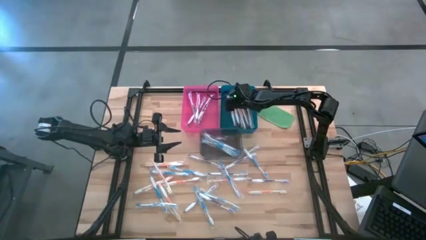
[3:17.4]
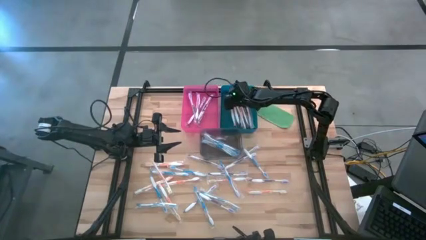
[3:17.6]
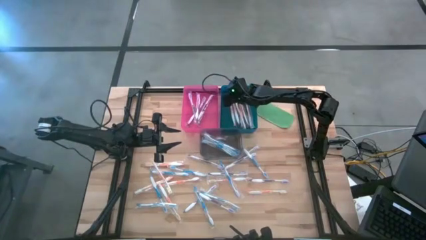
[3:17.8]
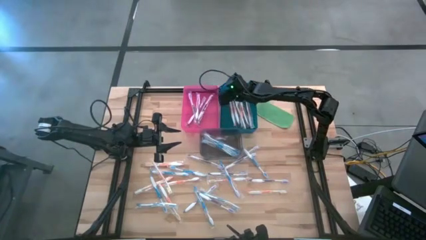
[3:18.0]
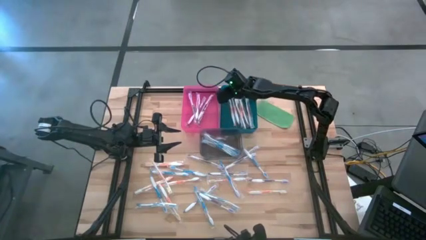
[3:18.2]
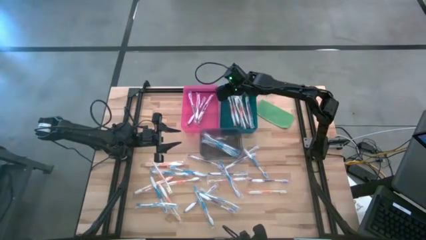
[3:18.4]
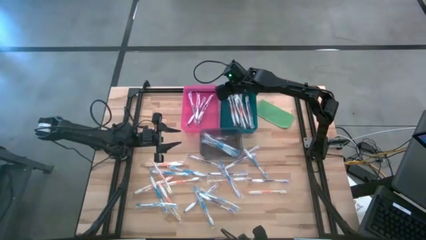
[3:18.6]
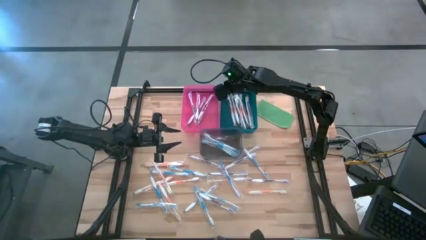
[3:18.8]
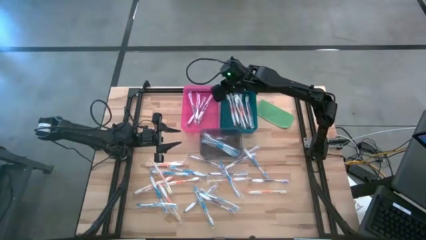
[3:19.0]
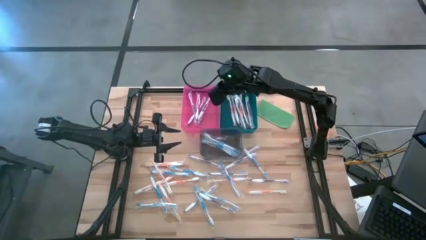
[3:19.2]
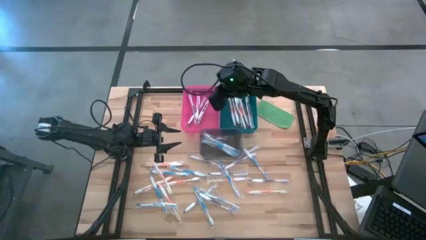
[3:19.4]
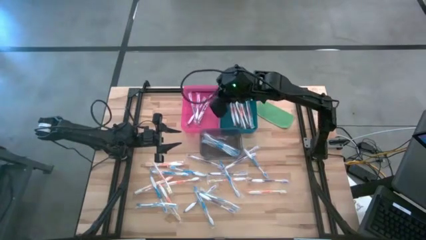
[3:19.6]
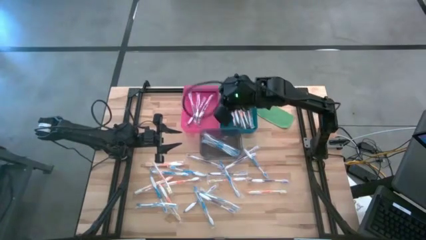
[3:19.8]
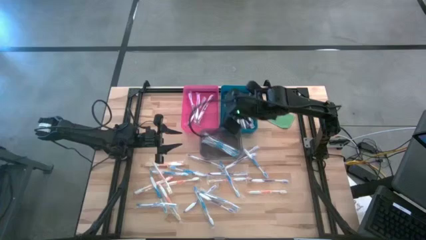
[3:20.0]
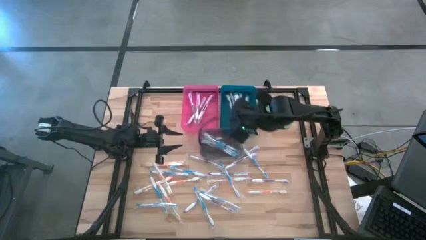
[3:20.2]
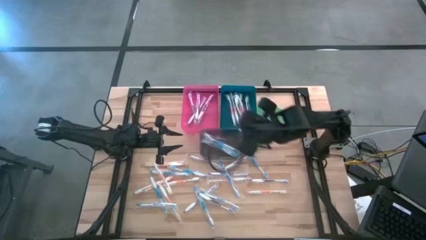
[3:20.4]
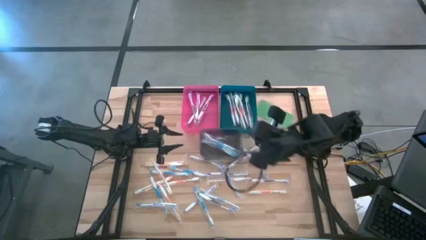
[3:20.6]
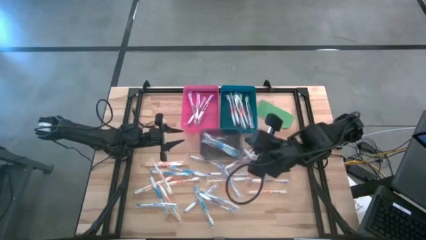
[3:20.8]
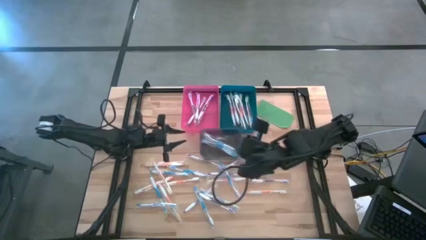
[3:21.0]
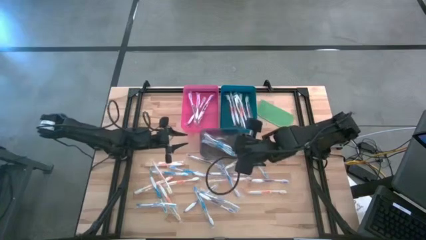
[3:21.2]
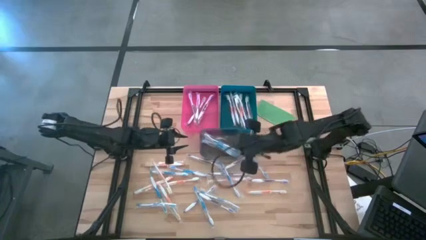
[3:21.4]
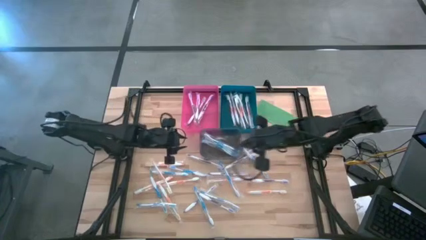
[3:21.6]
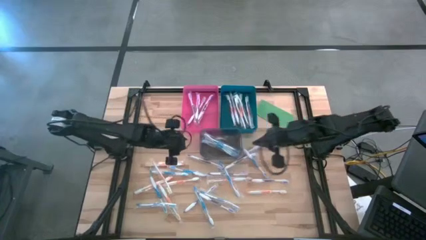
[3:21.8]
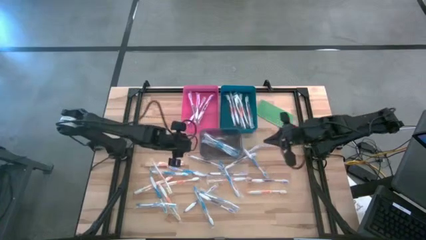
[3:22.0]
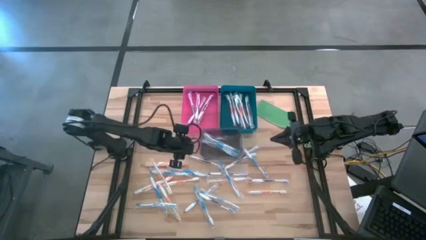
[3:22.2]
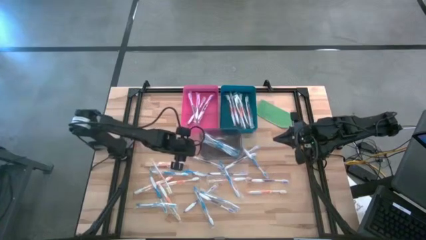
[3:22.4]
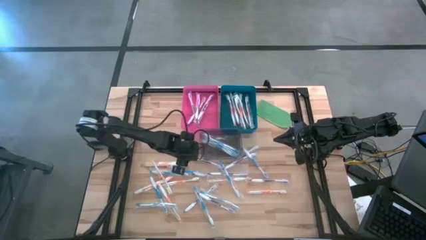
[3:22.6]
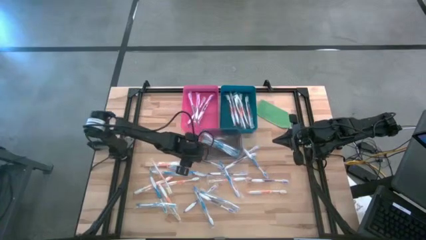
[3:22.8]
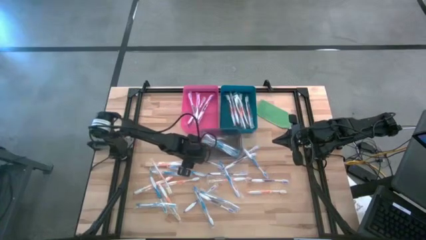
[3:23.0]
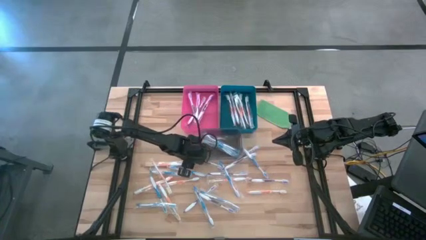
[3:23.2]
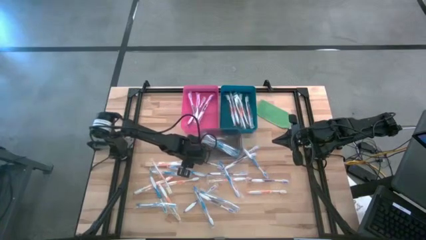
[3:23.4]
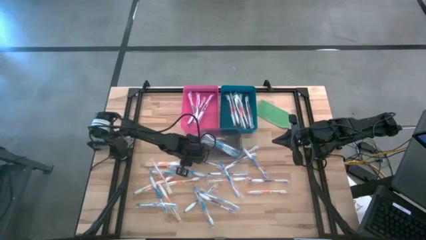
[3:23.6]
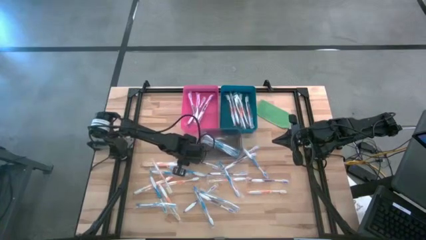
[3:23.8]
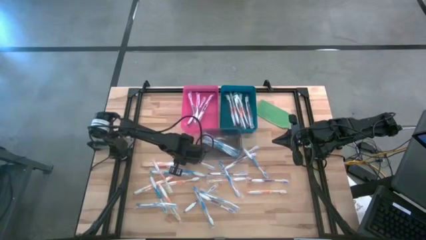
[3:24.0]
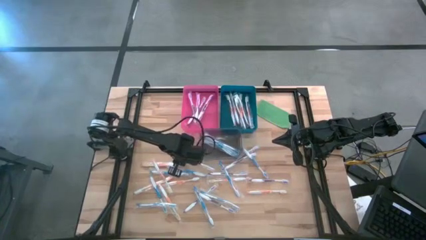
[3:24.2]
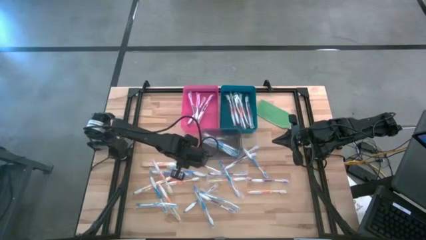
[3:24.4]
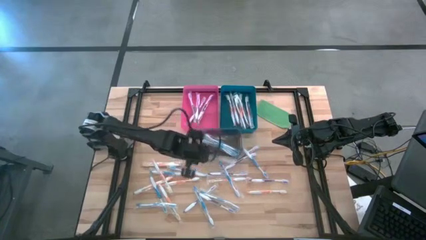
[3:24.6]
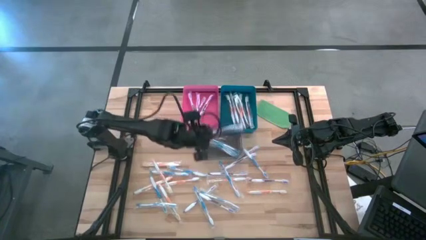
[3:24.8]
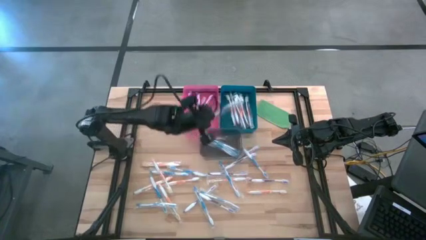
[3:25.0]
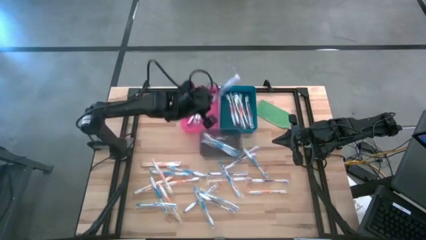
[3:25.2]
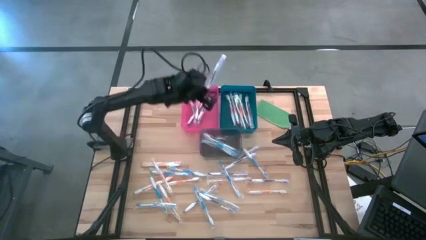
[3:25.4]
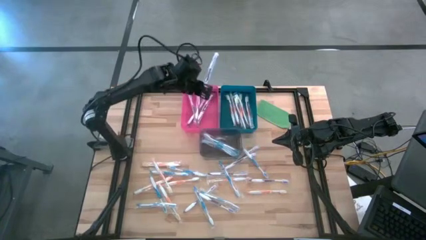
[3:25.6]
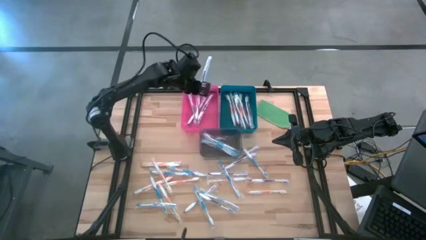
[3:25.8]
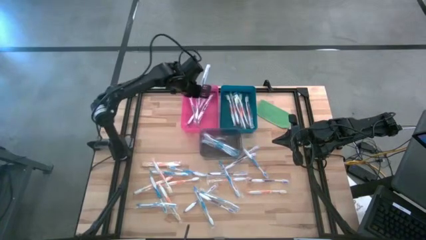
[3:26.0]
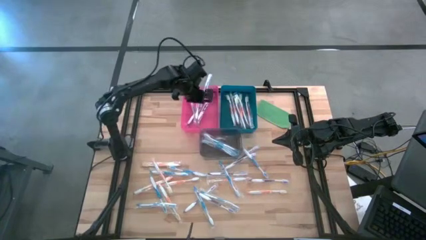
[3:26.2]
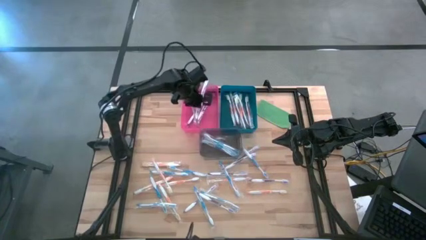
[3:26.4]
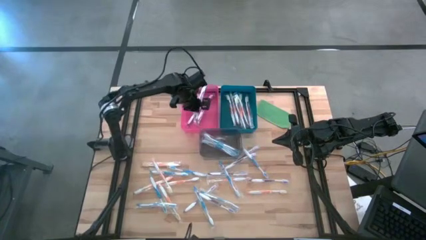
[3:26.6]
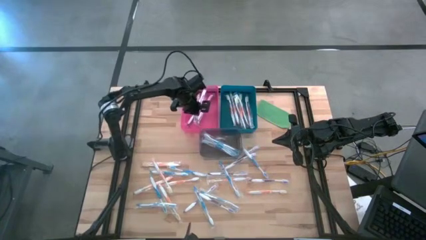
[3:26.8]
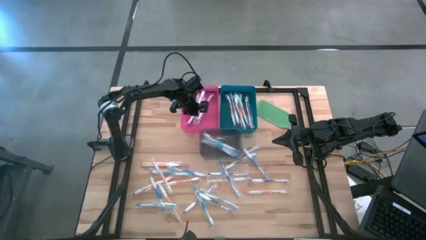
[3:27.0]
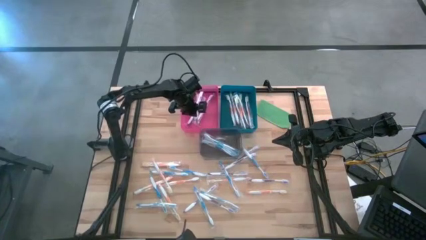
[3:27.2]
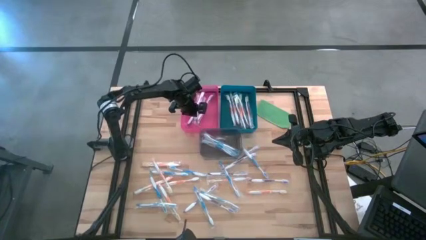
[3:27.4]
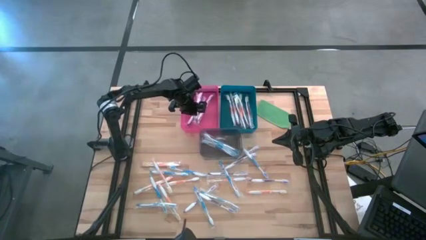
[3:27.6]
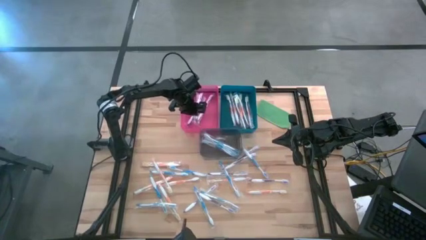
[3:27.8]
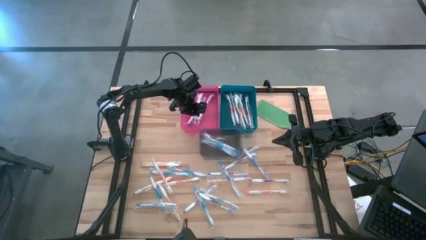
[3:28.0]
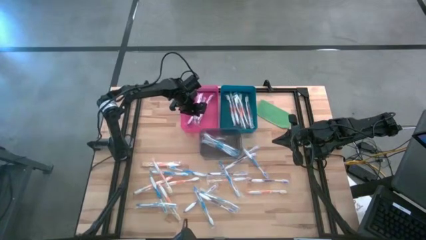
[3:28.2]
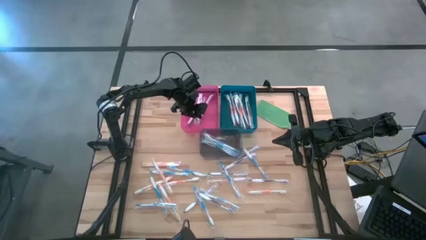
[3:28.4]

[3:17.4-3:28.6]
Task: Pick & Place Toothbrushes
Put the purple toothbrush into the pink bin

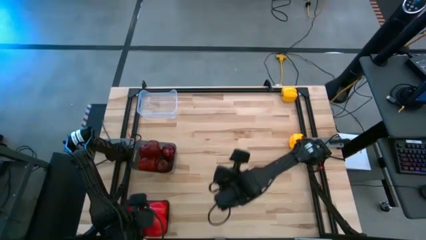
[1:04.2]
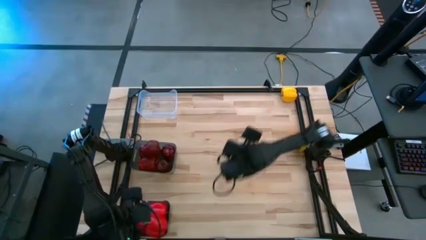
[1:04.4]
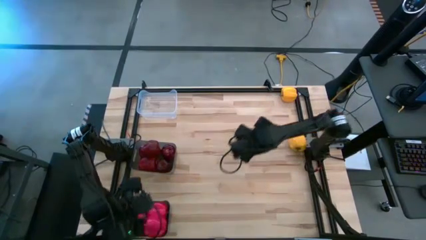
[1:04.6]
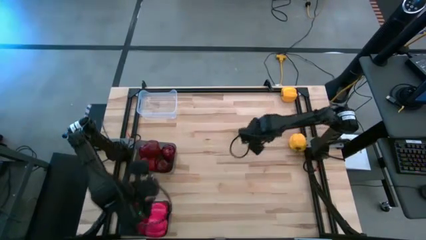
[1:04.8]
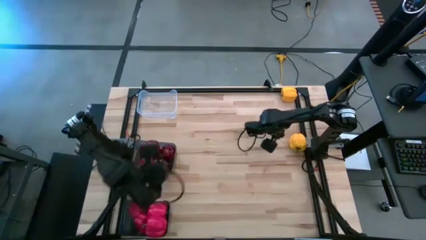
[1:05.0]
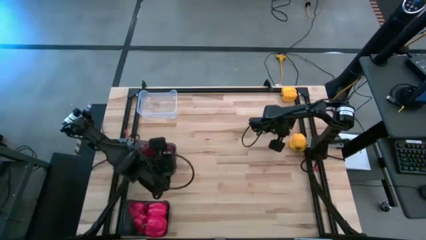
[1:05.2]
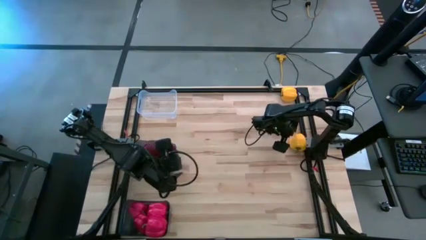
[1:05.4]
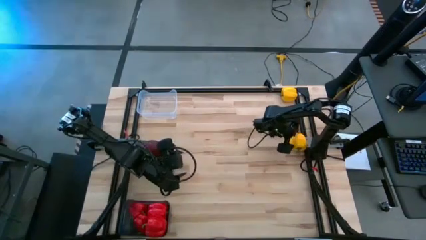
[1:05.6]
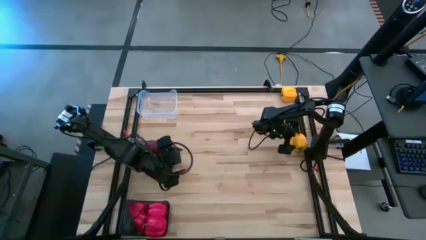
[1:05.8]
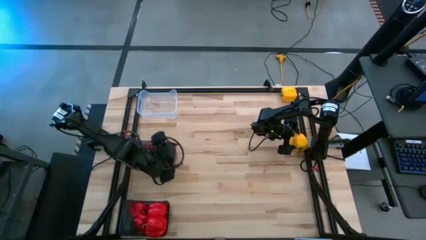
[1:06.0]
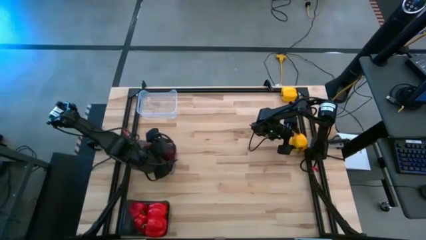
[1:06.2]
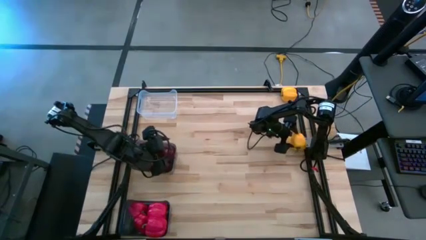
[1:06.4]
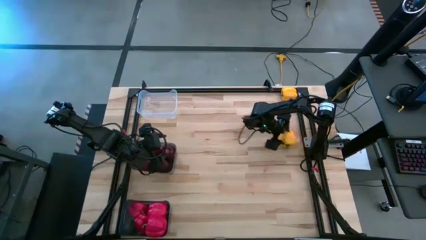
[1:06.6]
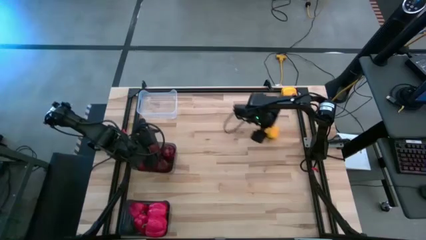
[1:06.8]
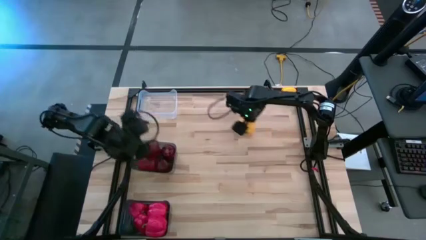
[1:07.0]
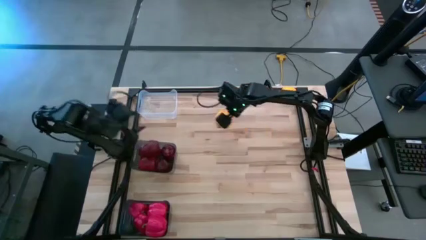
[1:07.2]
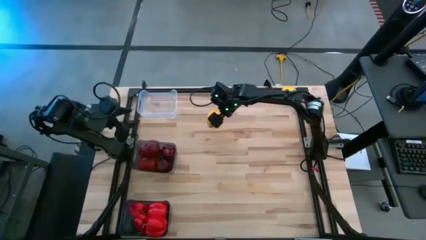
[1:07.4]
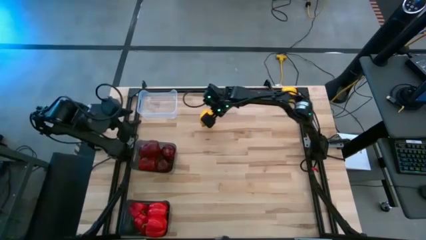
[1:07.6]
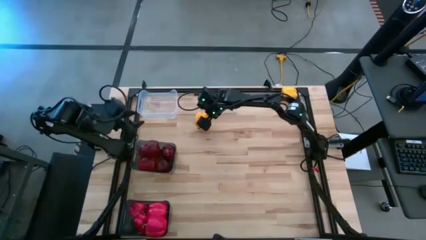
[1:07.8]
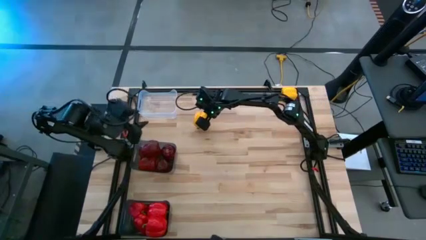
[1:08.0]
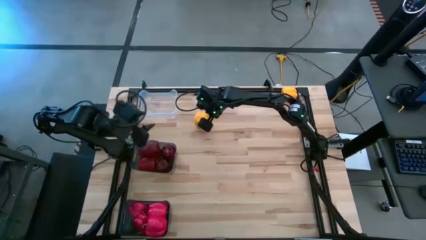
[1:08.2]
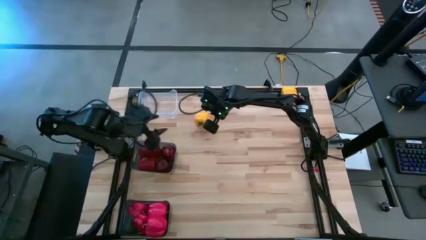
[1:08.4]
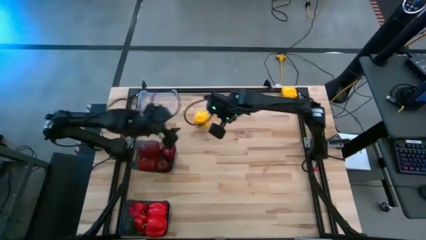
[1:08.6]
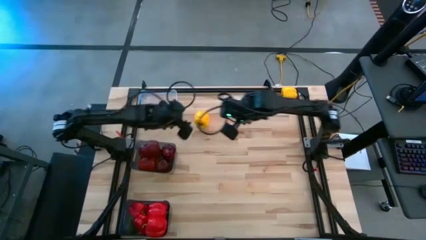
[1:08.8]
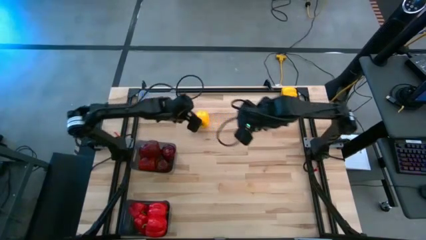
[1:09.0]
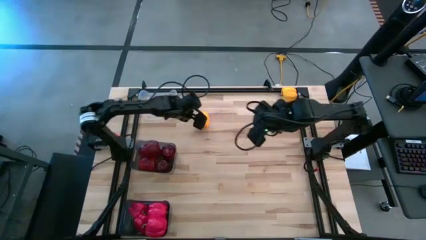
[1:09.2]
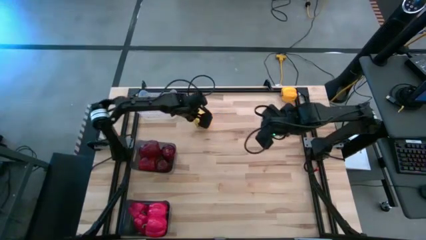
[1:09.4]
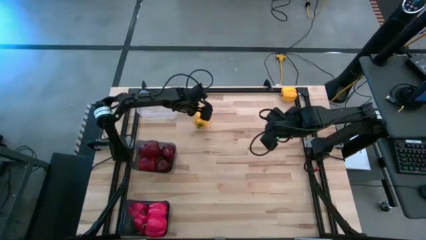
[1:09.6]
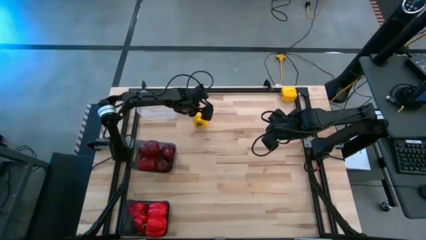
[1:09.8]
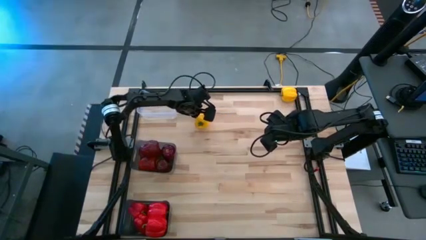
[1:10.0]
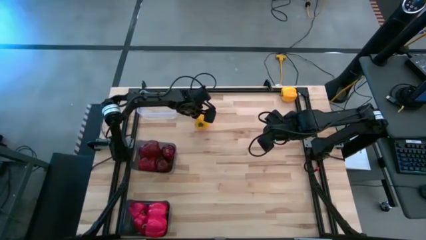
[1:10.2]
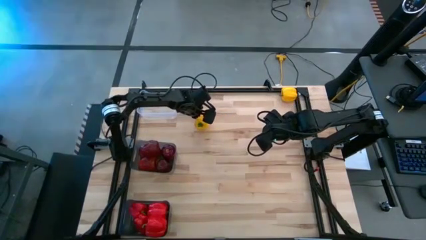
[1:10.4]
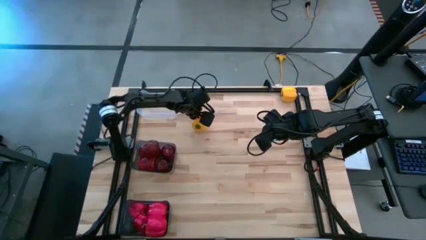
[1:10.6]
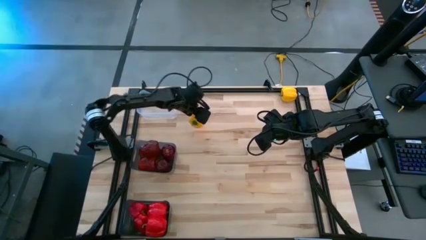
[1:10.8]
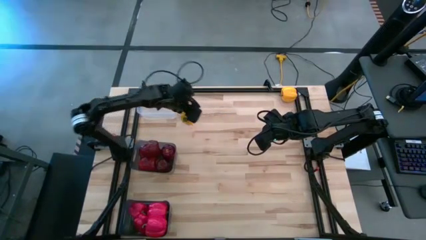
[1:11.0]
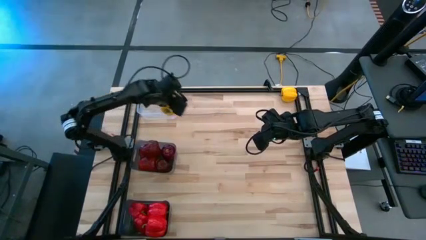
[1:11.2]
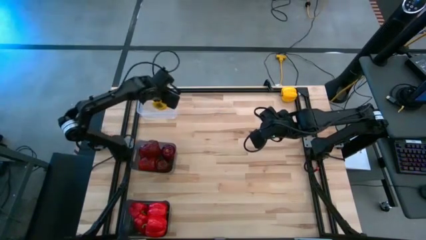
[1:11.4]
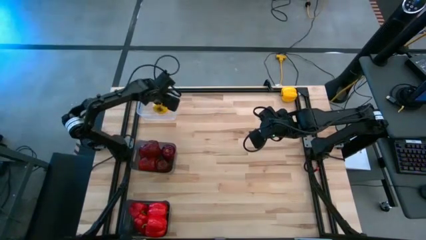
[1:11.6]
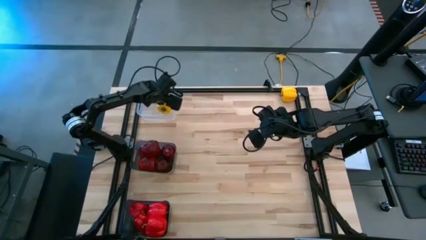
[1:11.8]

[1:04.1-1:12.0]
Task: Sort produce into baskets
Put the yellow bell pepper into the white bin
